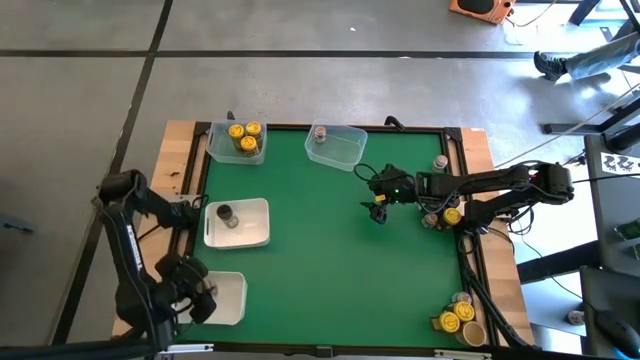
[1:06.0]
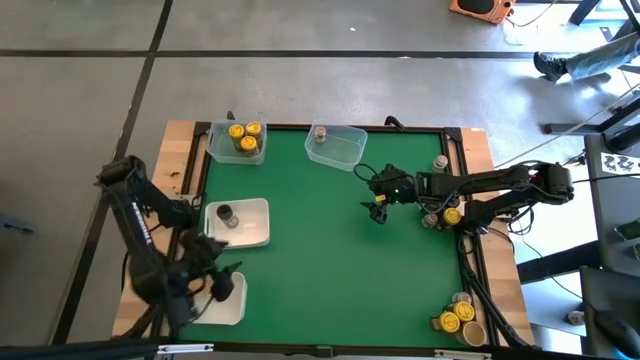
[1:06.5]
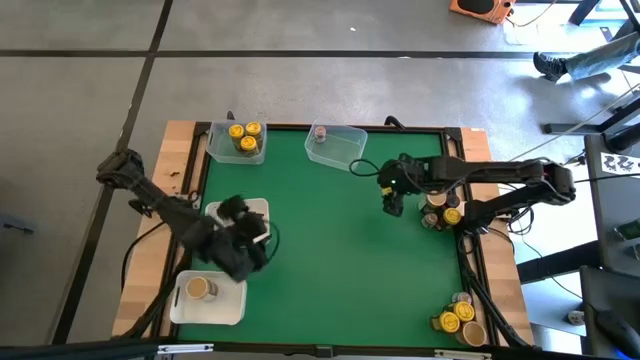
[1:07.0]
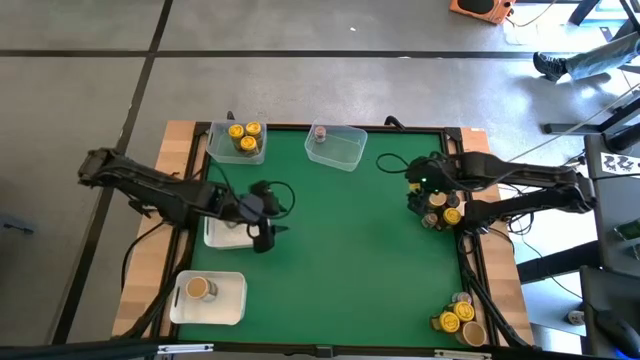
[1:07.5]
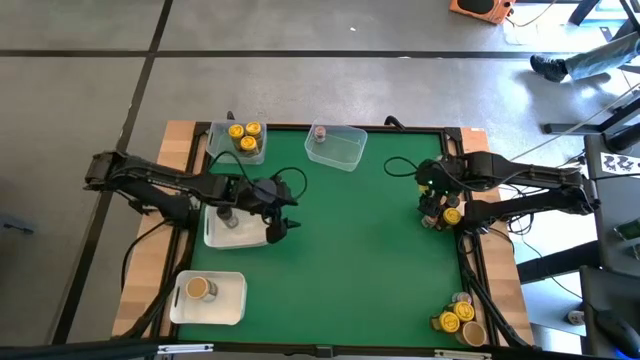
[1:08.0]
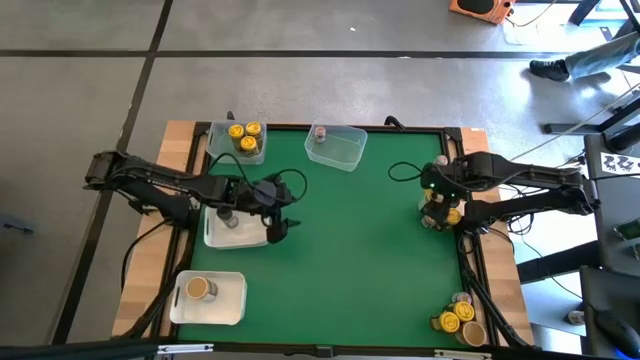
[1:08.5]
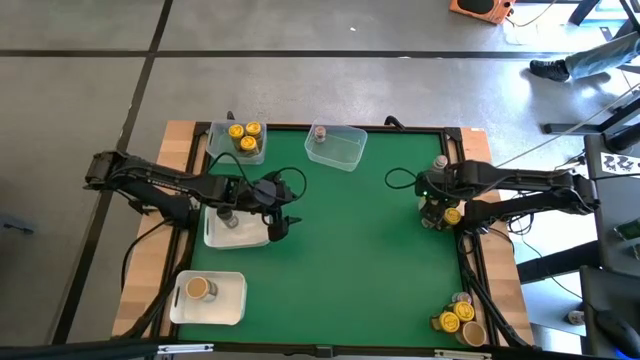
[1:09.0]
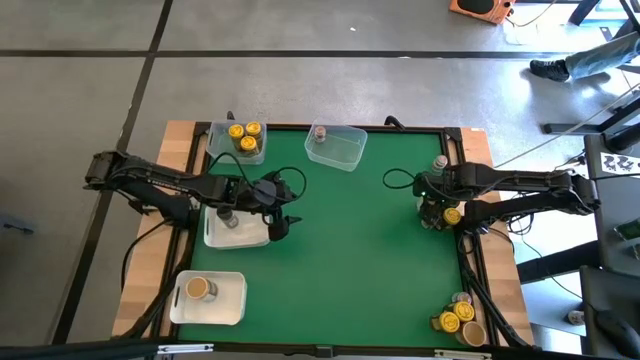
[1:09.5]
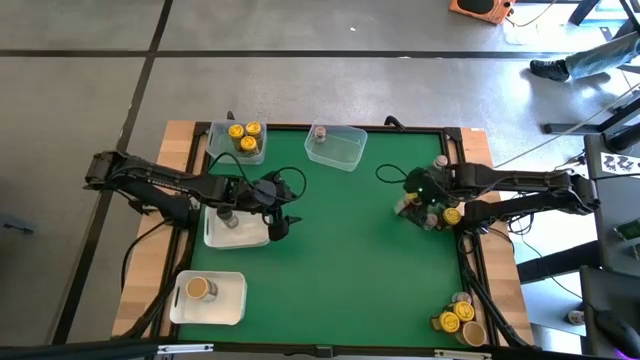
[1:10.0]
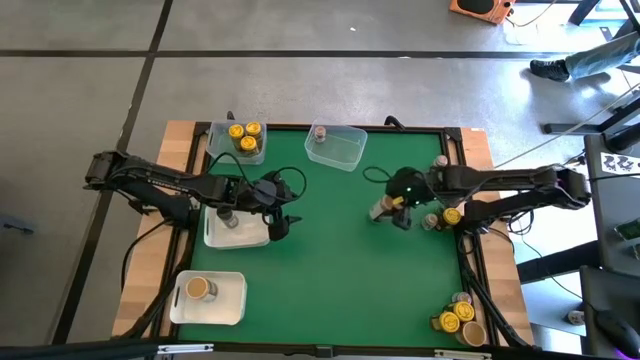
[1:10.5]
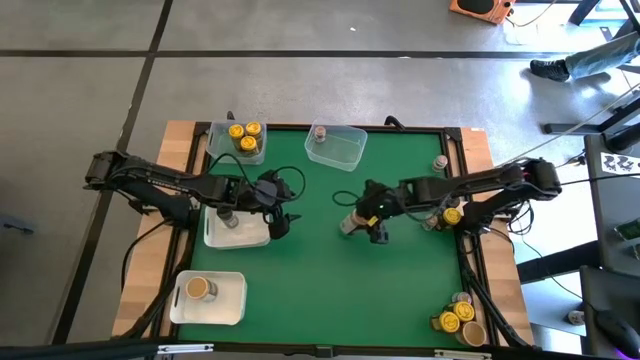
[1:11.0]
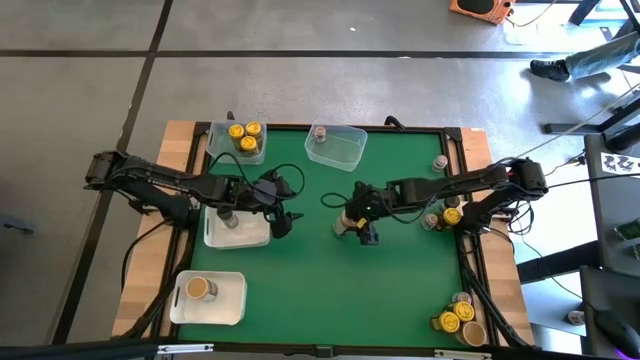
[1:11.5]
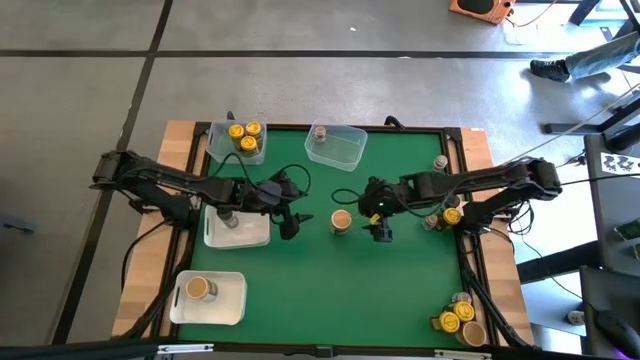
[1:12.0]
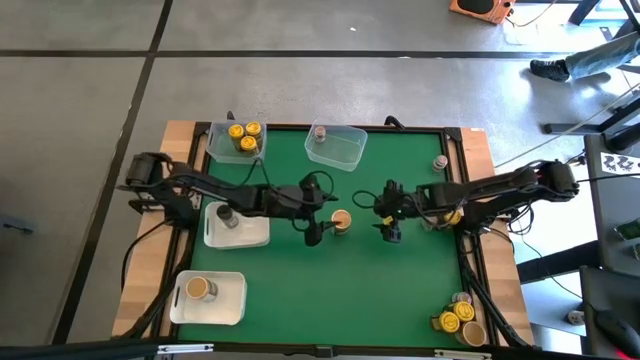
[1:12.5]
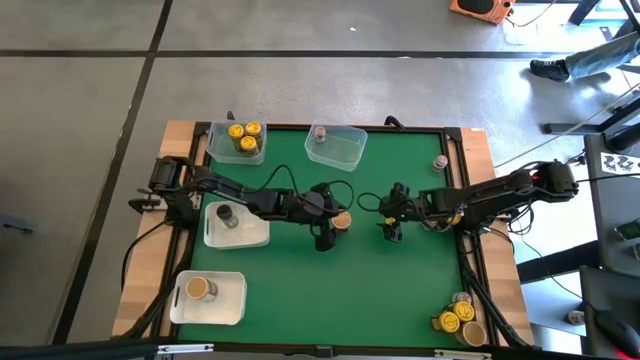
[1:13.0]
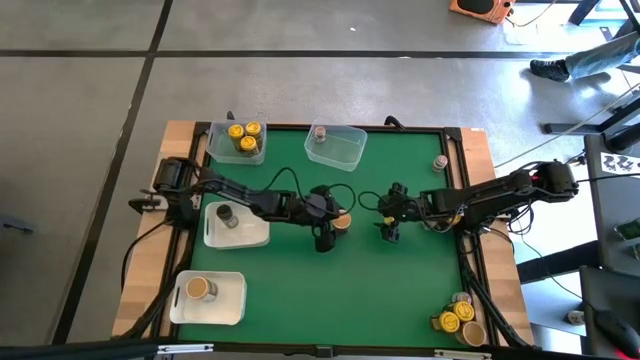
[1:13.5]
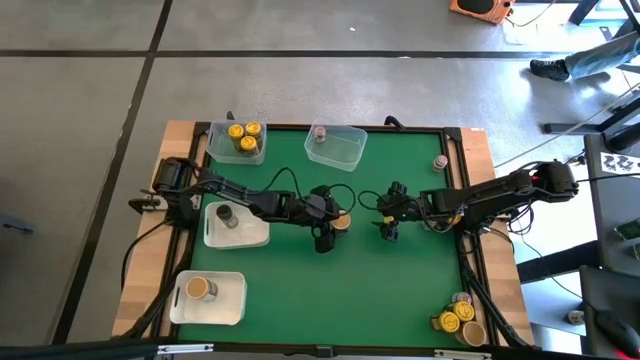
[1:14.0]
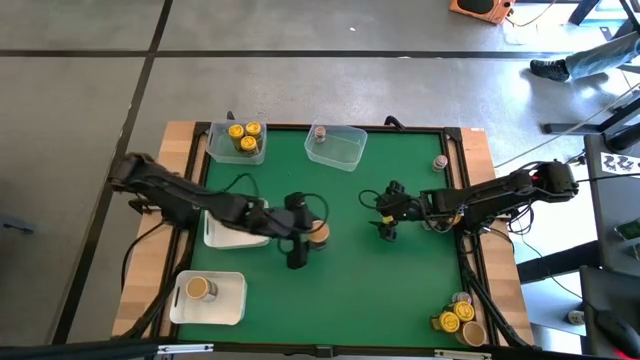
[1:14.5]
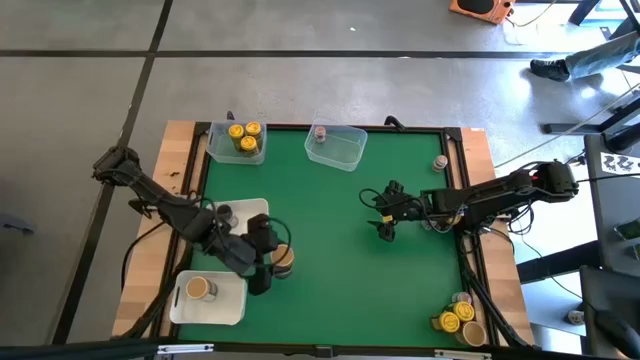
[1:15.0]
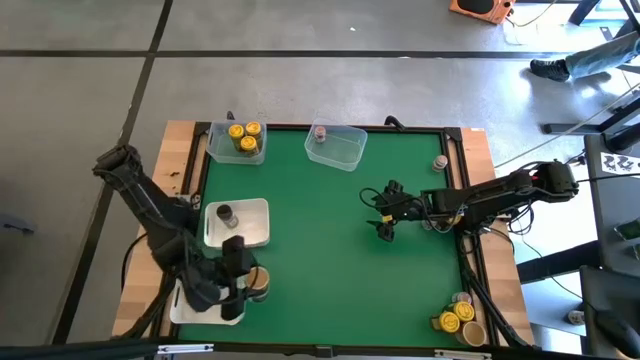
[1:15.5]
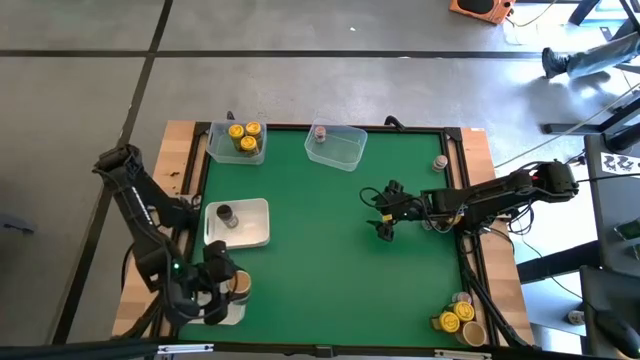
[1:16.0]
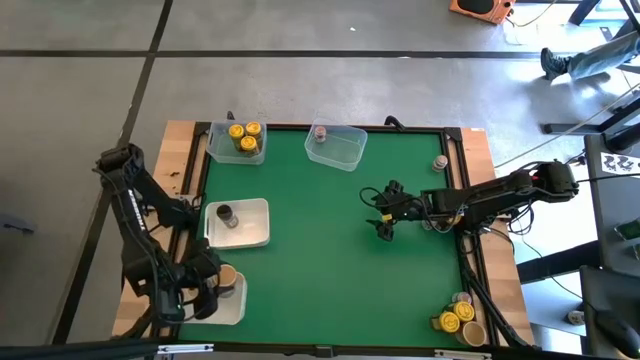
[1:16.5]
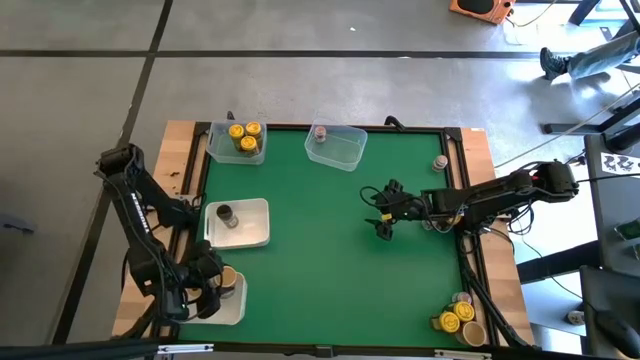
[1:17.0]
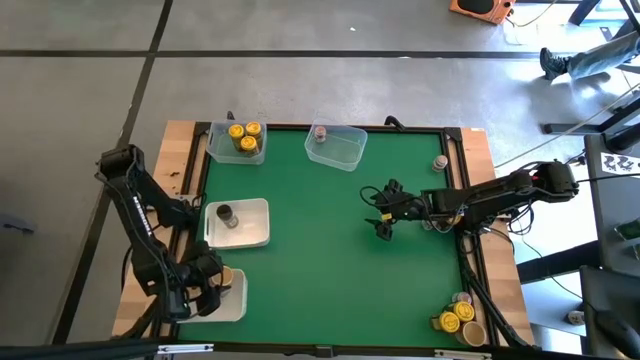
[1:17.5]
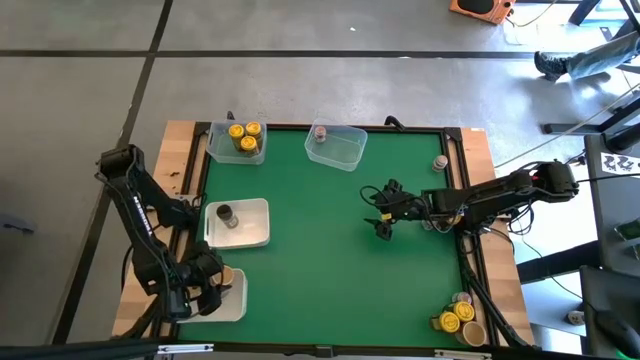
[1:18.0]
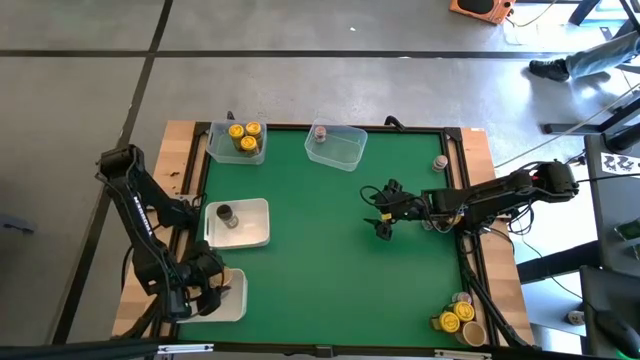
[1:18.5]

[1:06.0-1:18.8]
Task: Sort spices by type
Put the gold seasoning bottle into the bottom white bin

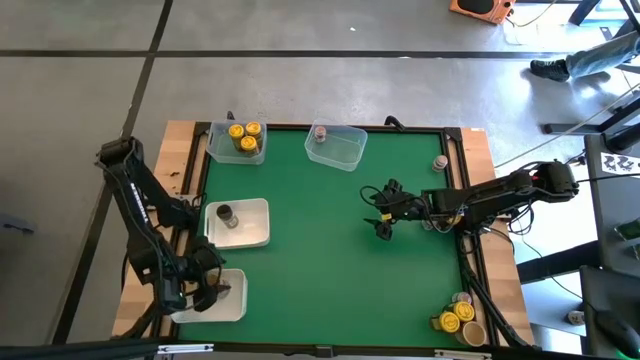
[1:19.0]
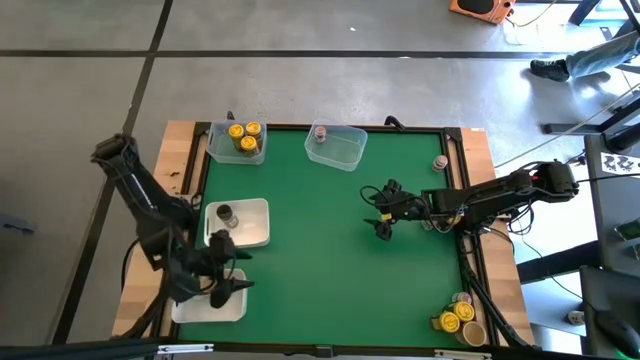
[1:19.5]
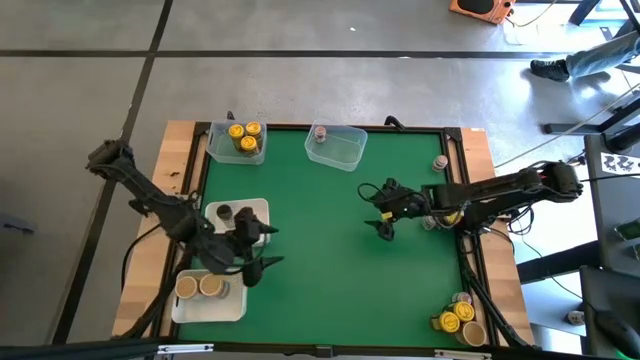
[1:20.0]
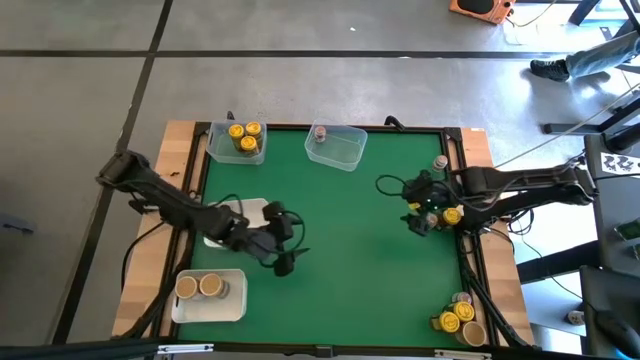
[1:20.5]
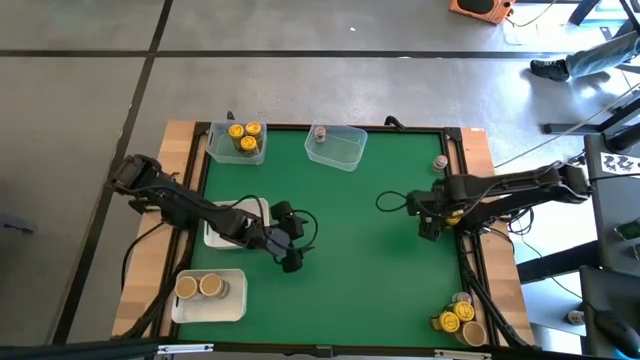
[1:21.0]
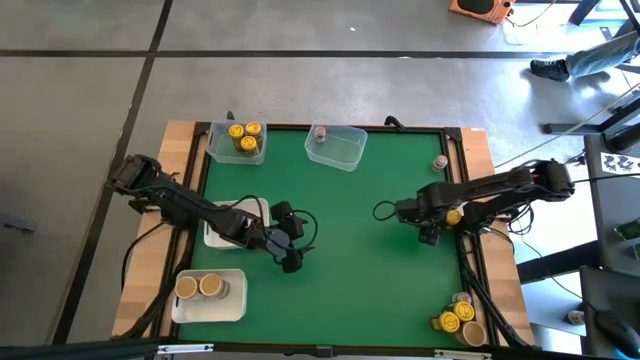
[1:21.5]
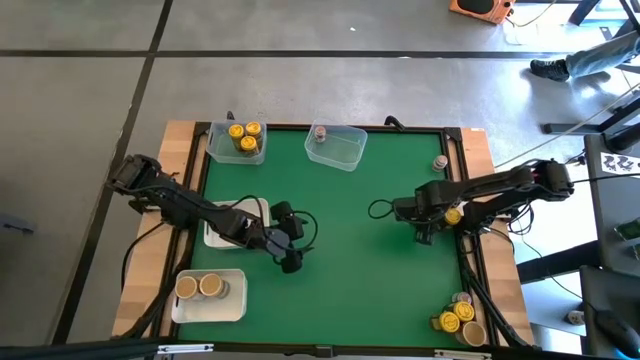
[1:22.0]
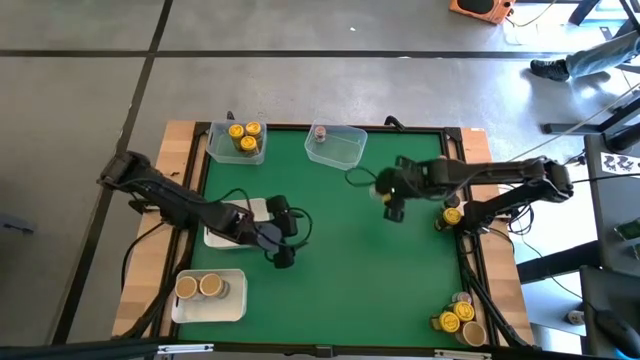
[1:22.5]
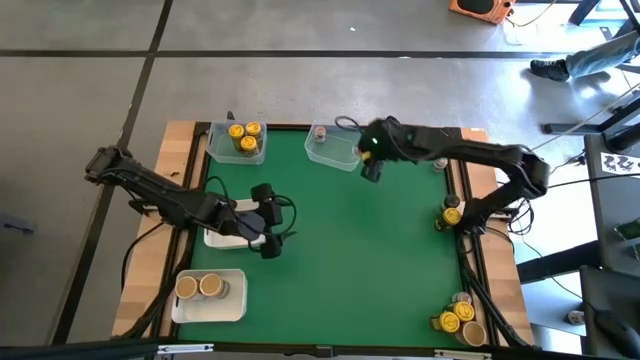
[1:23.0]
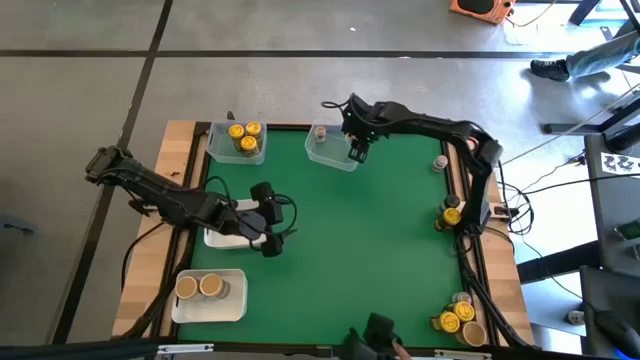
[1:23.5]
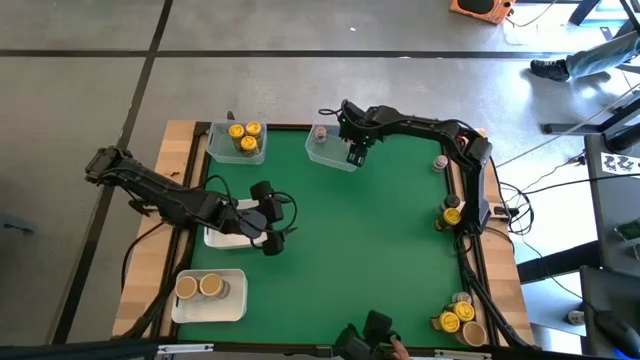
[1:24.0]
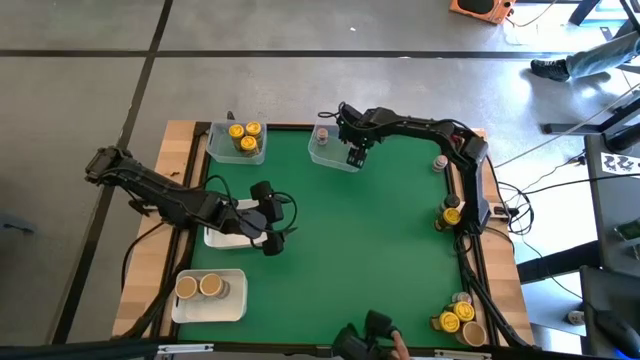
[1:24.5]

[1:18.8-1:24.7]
Put the brown seasoning bottle into the right transparent bin

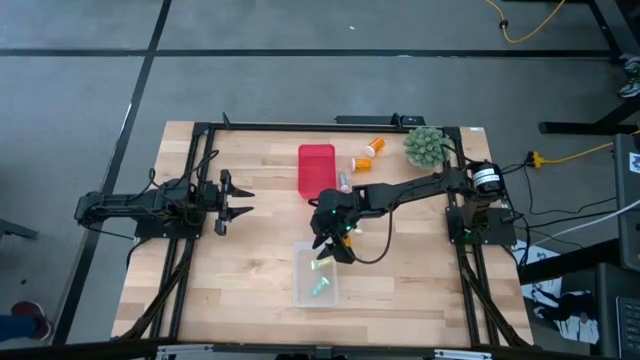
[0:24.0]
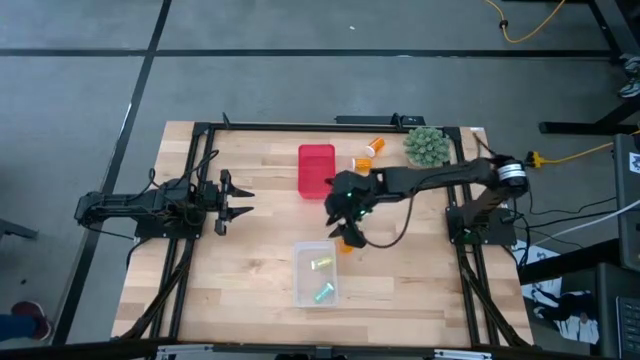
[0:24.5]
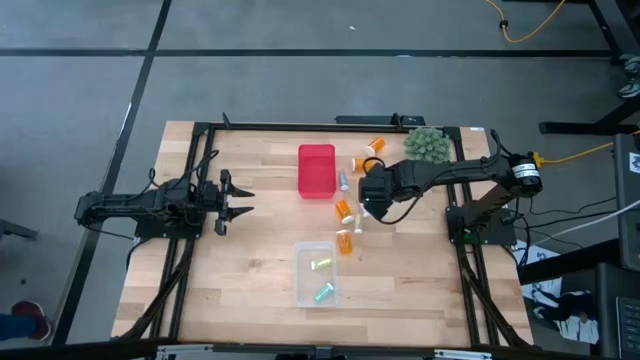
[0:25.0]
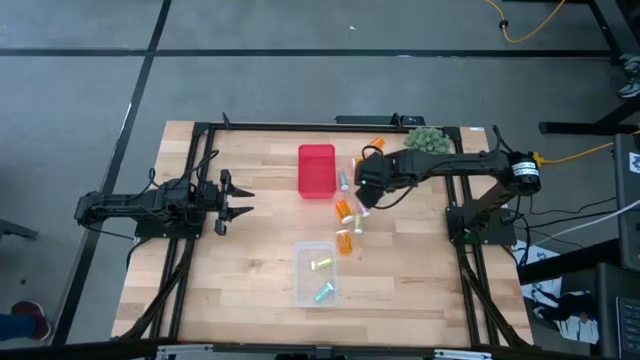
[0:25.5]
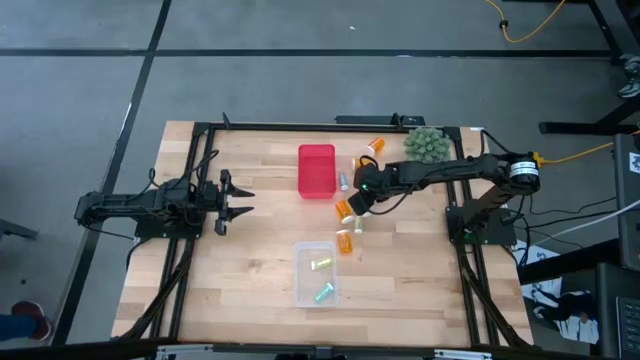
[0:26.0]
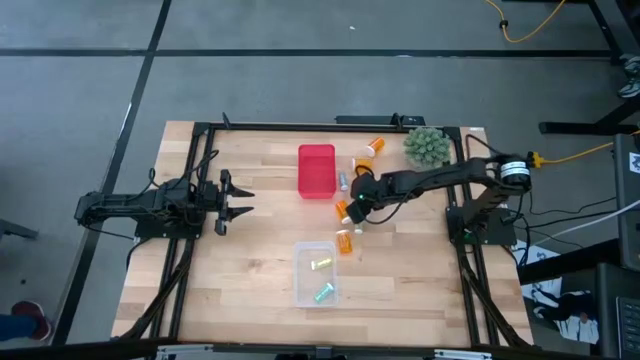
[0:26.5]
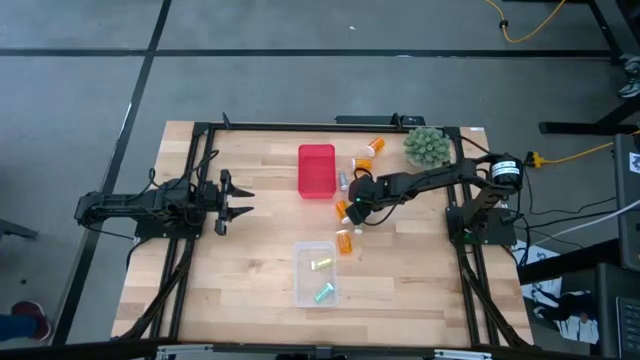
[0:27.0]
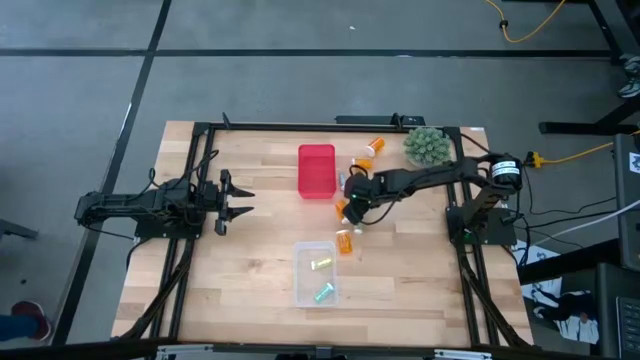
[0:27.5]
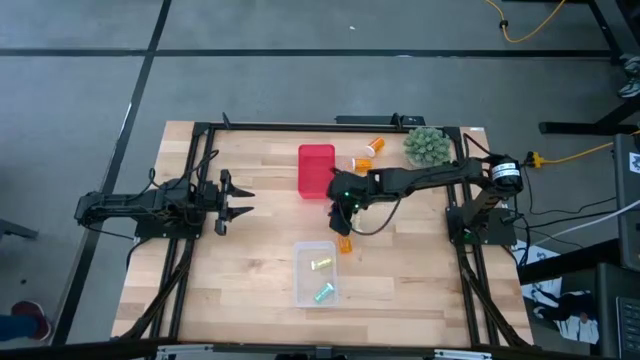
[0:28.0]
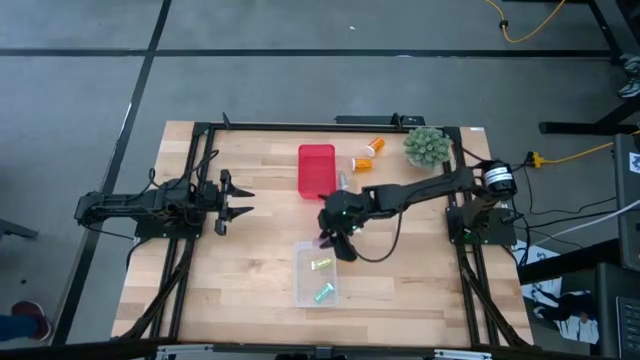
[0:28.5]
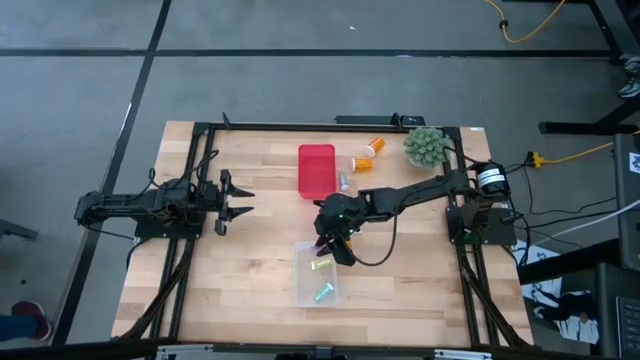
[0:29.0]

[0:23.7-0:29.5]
Task: Pick and place medicine bottles into bin by pill shape (circle, oval)
Put the small pink pill bottle into the transparent bin
